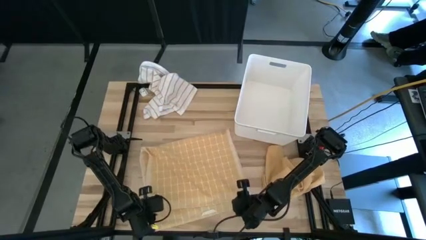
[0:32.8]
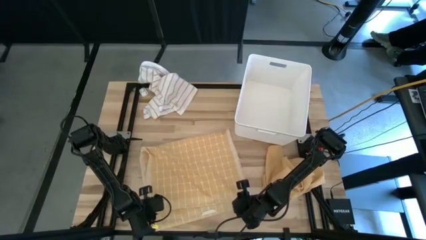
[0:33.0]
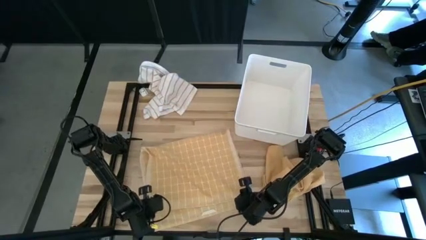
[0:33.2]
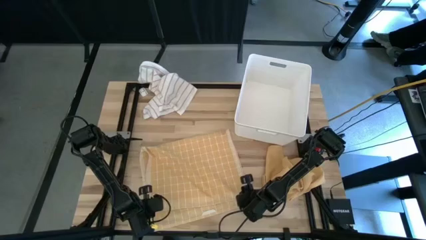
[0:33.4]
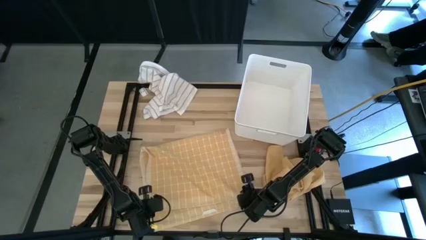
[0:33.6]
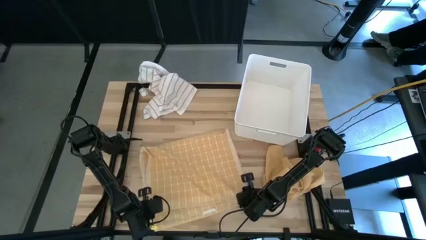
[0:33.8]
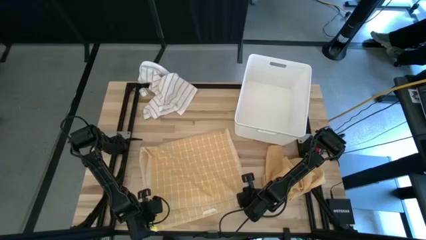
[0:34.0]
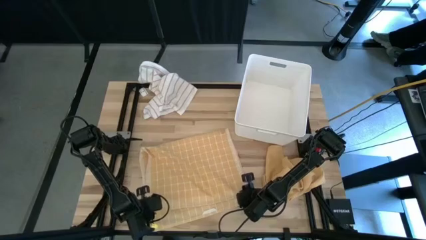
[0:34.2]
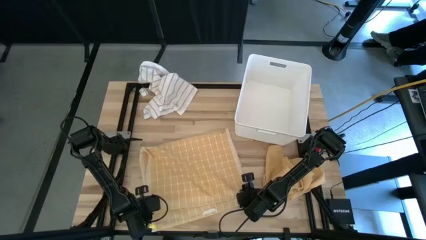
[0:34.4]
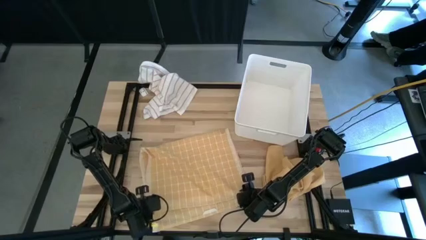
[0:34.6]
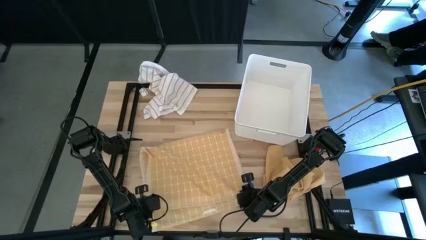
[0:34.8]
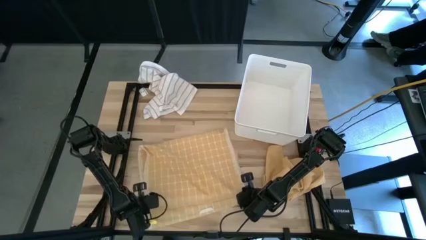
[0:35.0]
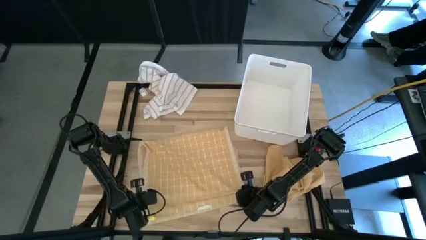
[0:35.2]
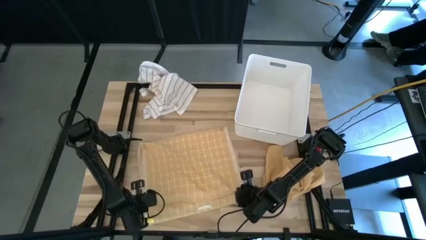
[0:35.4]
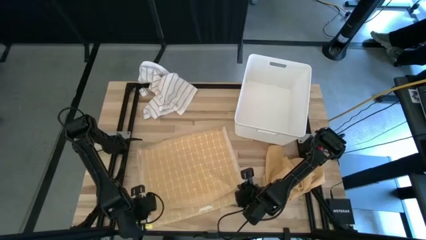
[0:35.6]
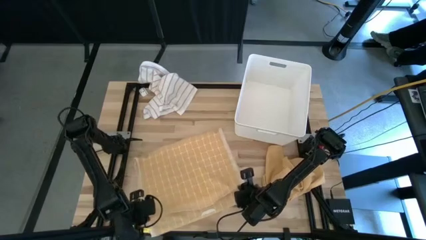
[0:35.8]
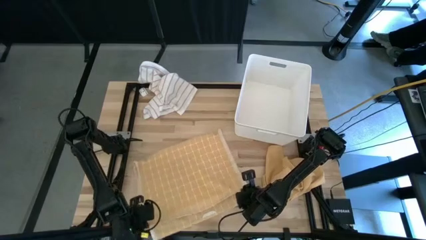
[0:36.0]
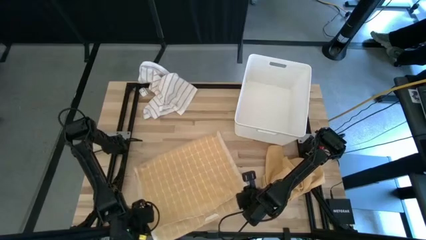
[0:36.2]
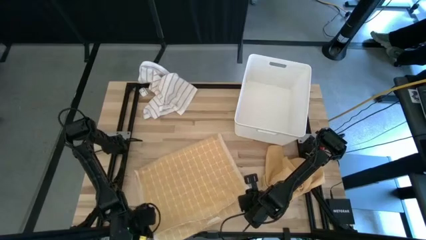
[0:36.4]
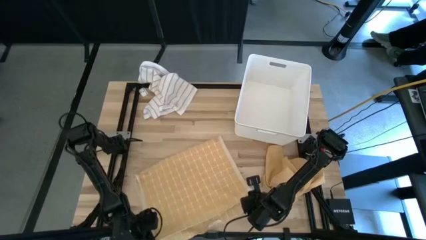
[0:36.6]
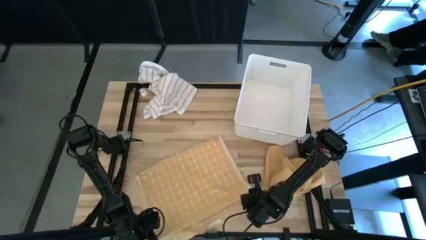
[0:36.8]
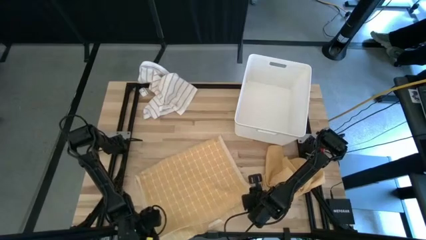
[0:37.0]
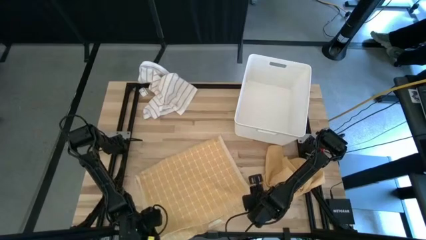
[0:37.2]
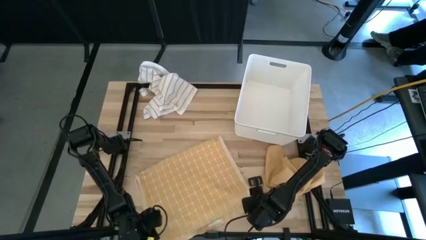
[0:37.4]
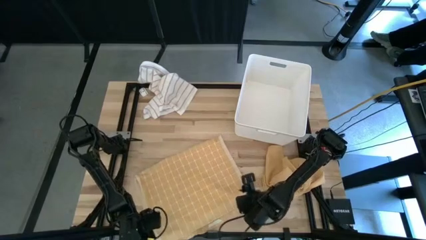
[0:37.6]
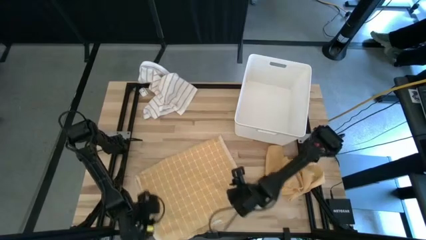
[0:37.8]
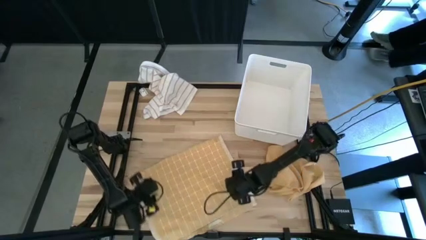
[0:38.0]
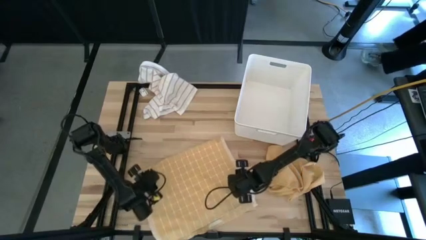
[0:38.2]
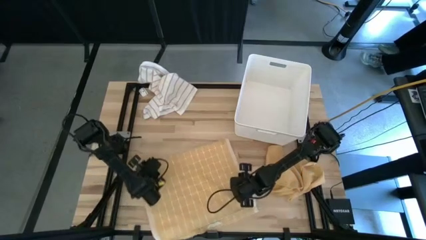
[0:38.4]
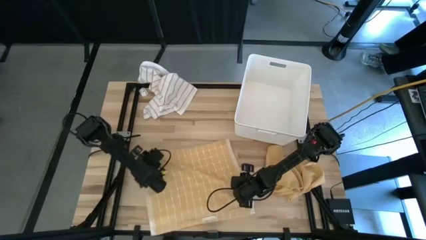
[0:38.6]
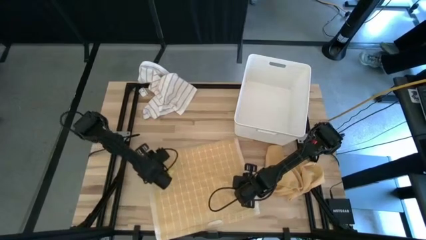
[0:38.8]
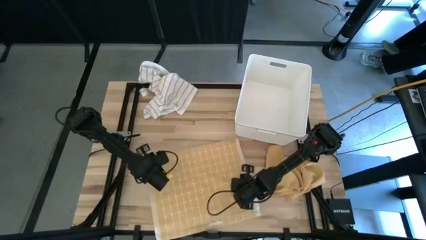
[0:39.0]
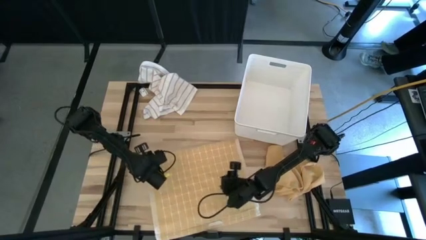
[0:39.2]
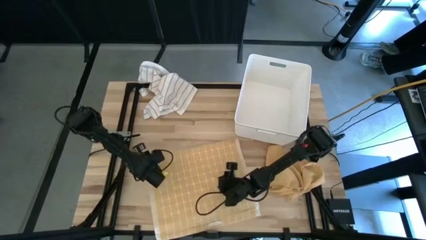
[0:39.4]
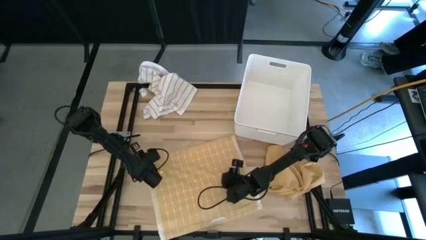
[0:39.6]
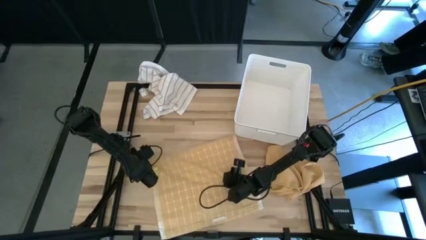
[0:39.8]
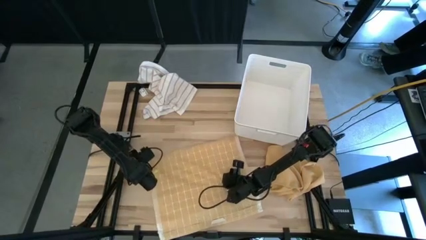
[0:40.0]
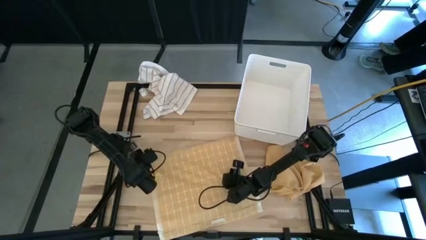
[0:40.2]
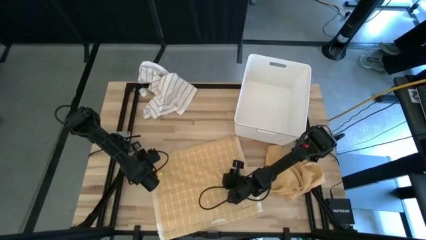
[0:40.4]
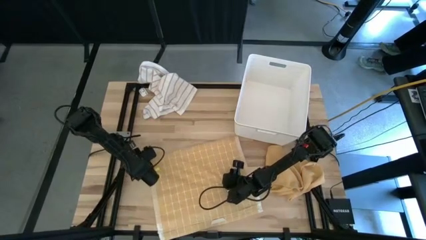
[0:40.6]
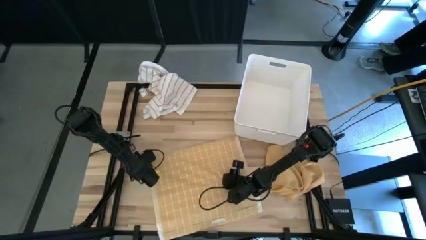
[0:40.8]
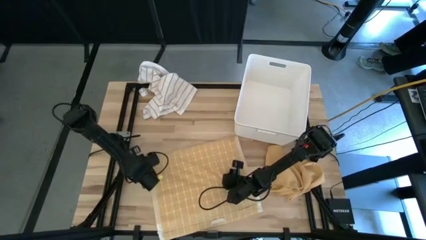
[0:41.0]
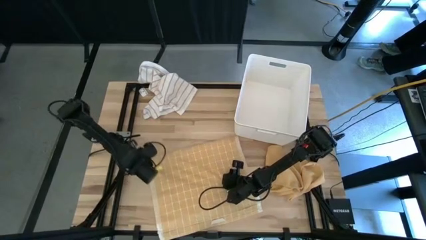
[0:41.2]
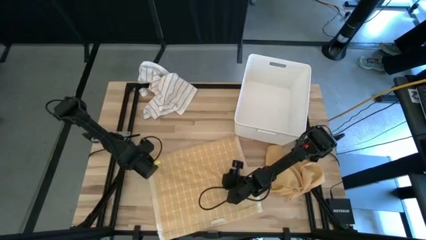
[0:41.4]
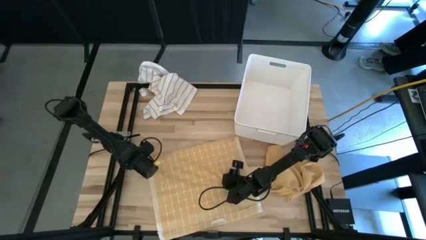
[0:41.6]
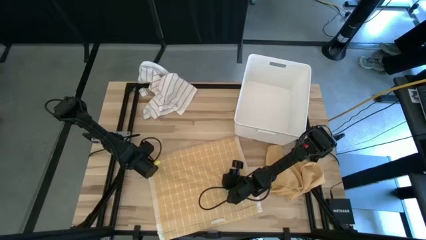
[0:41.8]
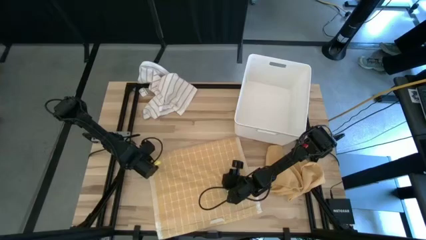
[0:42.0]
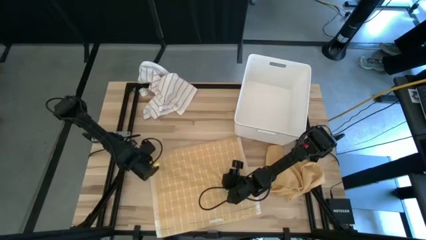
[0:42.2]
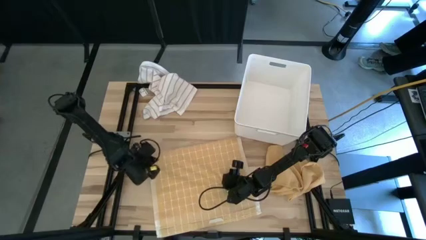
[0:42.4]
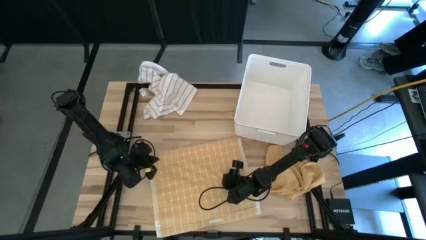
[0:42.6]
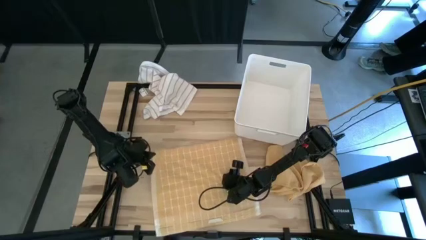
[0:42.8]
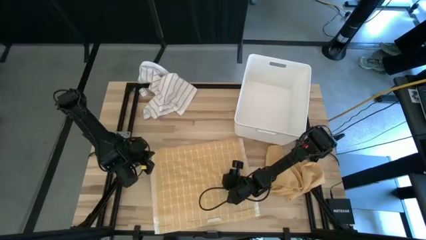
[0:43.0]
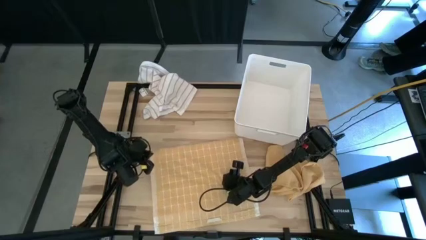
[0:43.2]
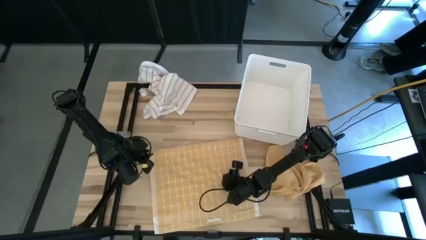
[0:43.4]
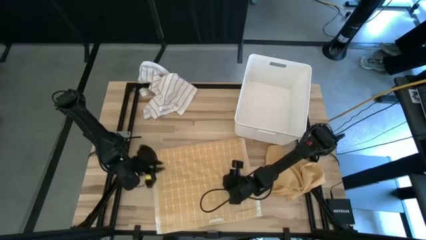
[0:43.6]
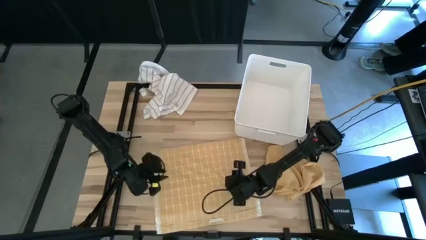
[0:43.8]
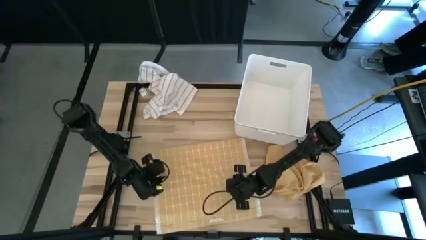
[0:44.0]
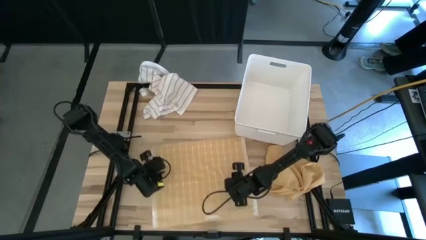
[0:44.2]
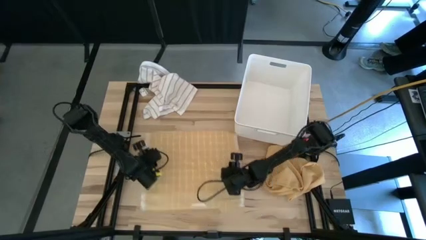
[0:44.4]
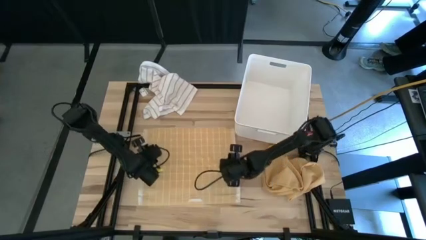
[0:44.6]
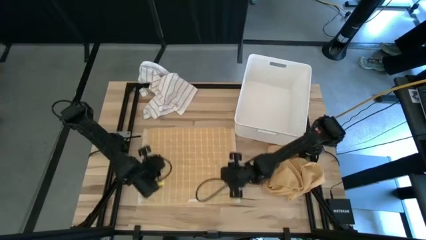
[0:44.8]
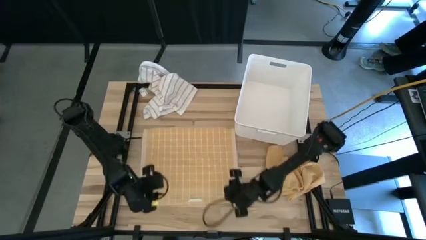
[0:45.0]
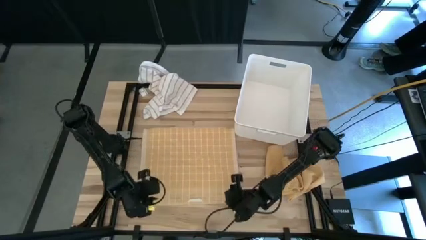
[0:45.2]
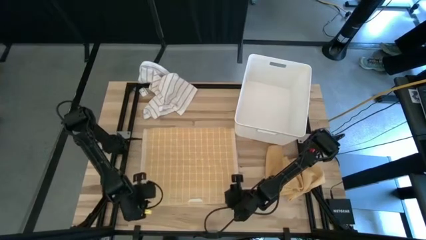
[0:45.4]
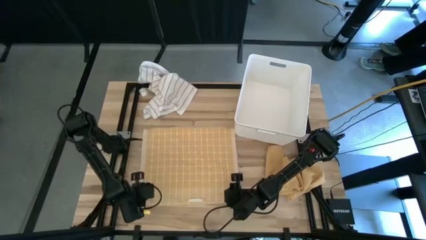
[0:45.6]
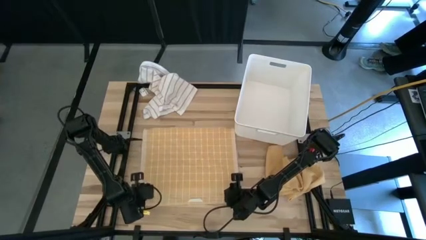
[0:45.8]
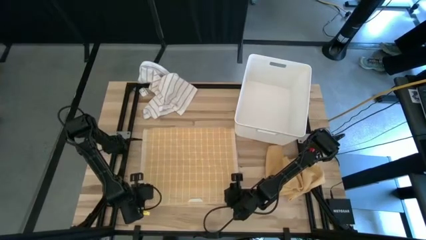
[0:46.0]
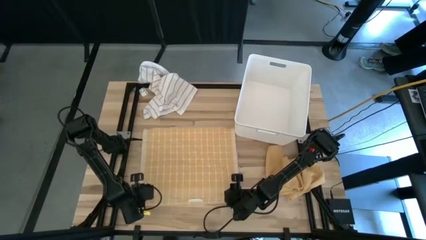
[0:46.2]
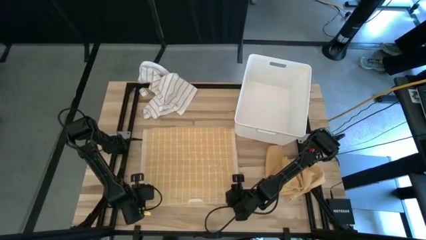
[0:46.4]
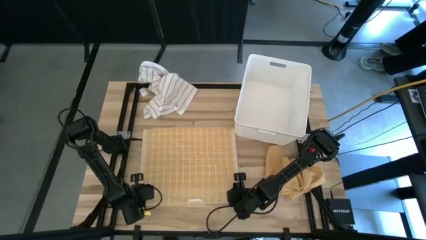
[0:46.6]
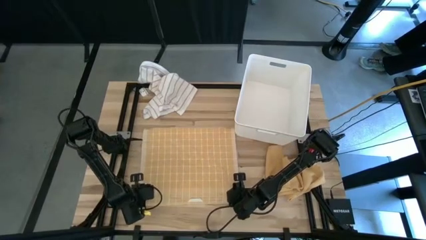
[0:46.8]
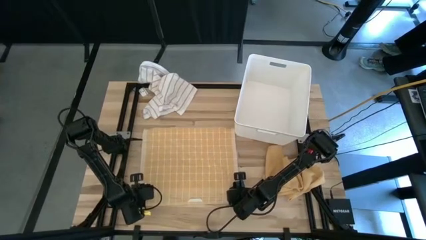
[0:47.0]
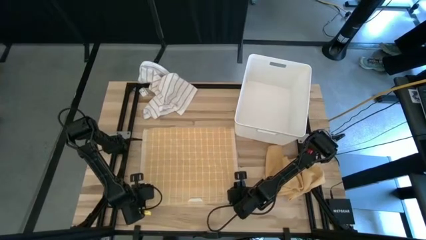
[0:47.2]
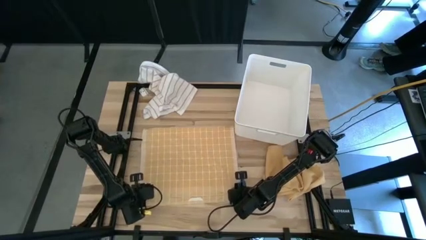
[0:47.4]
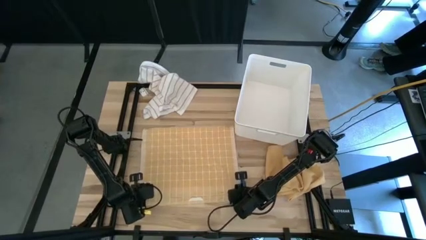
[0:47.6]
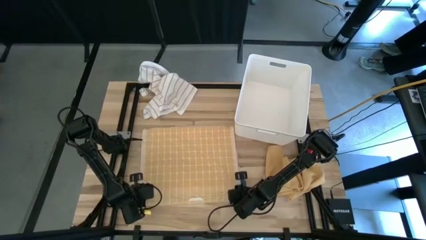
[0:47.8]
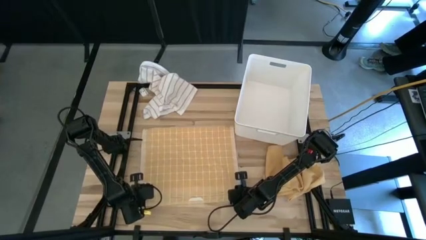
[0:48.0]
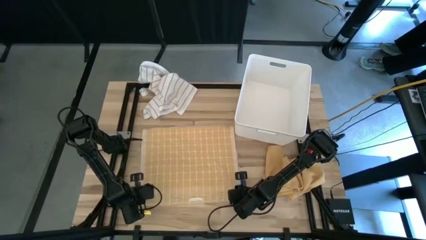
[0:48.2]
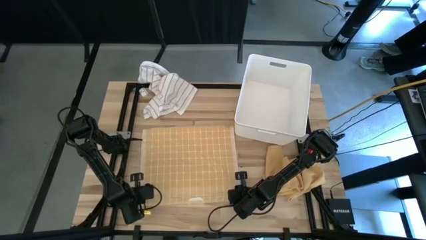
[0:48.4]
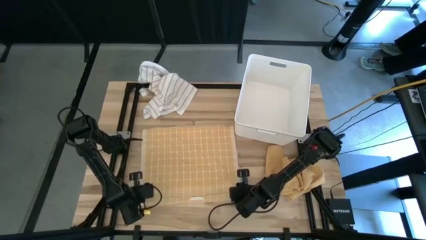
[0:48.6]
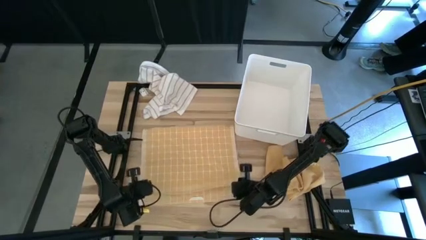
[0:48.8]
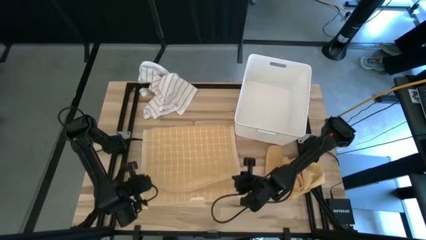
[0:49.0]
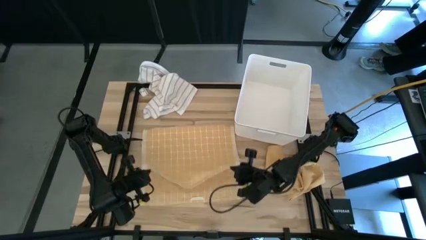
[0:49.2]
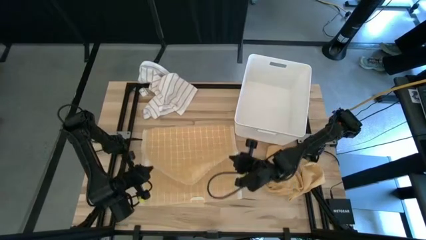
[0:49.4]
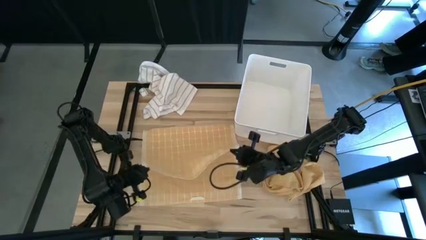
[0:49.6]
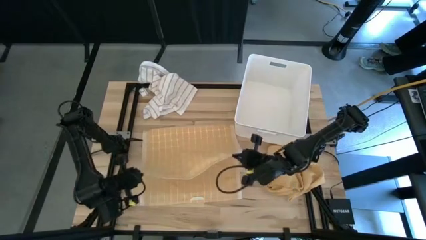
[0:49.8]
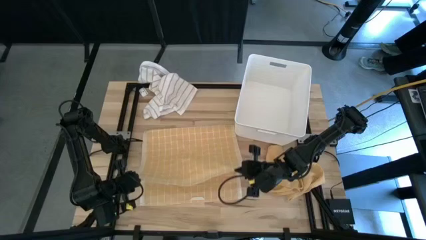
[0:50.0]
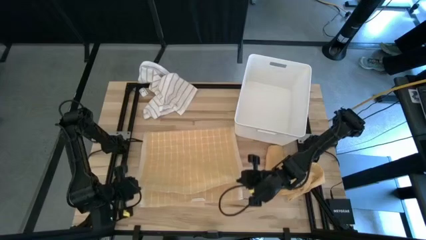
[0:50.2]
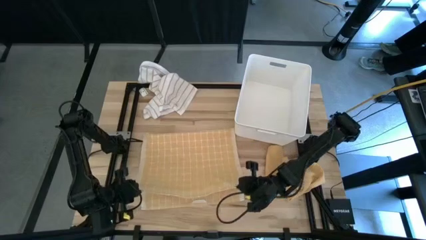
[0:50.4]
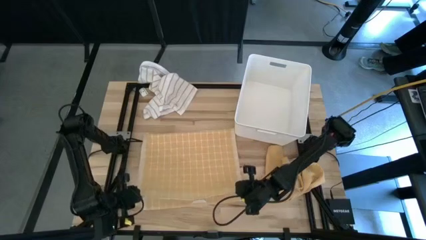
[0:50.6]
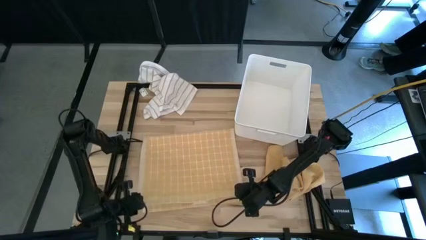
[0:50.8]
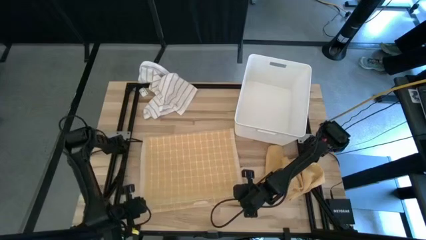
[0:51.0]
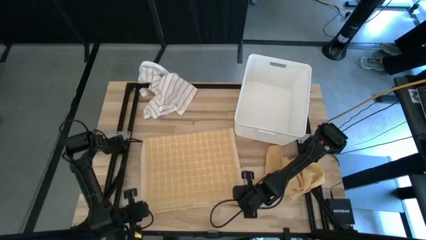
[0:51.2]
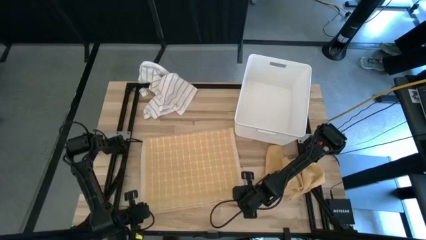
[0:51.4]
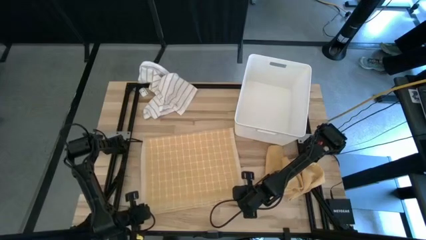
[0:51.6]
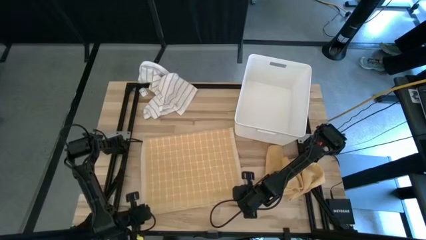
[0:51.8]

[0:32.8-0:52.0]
Task: Fold towel
Fold the yellow patterned towel
